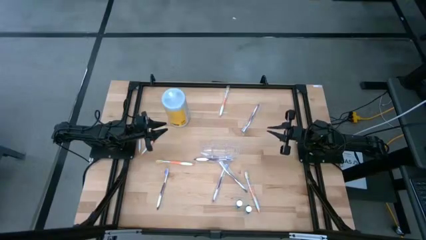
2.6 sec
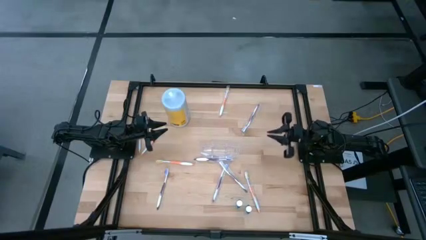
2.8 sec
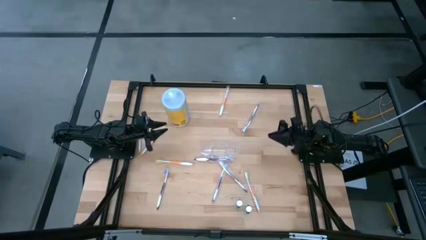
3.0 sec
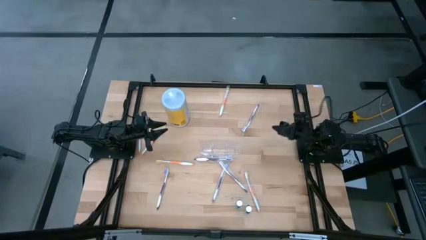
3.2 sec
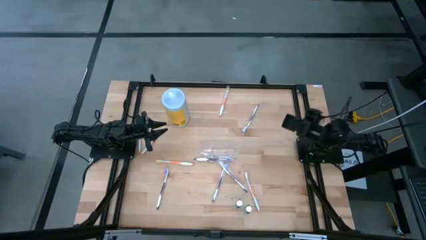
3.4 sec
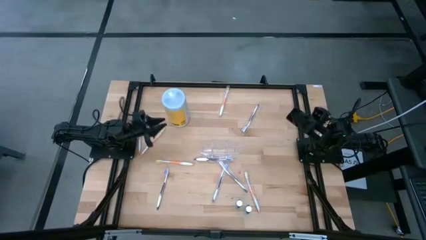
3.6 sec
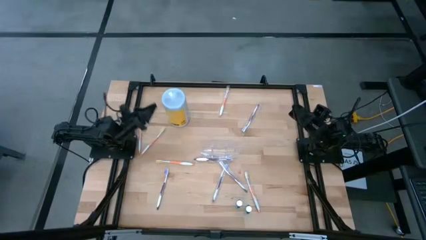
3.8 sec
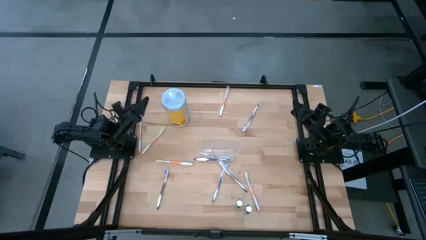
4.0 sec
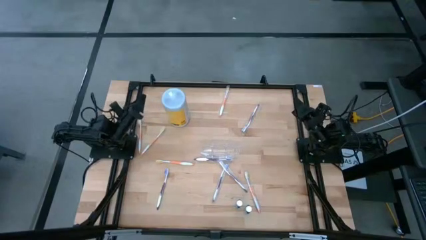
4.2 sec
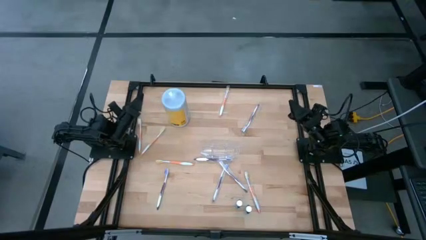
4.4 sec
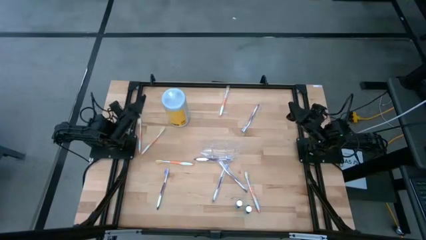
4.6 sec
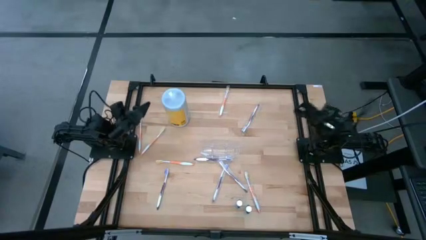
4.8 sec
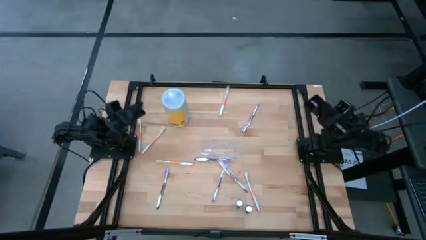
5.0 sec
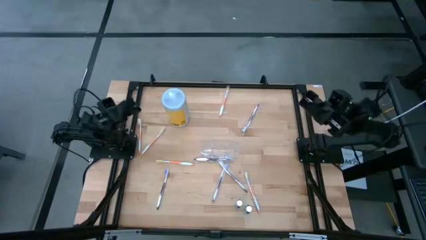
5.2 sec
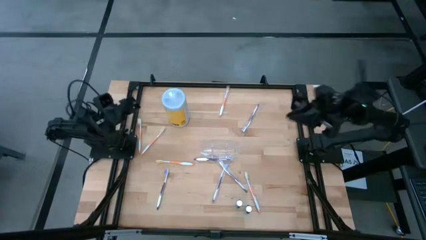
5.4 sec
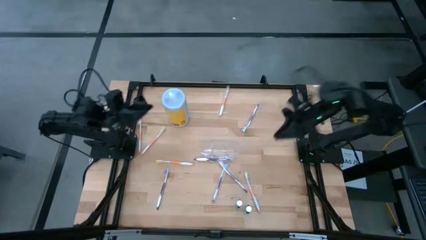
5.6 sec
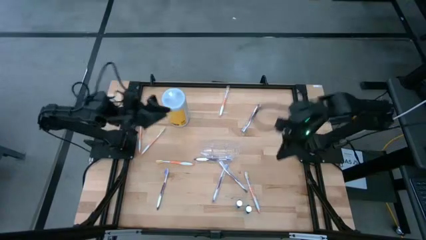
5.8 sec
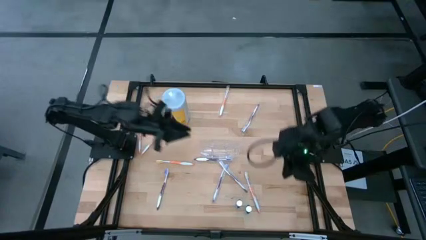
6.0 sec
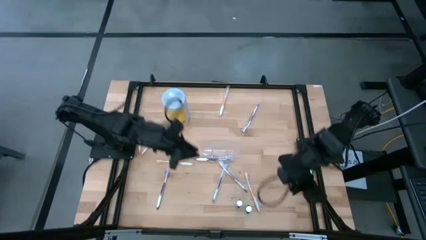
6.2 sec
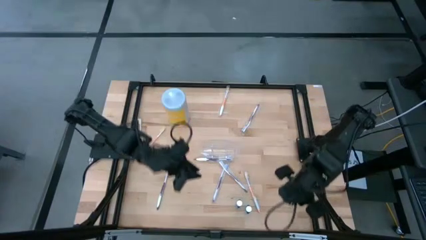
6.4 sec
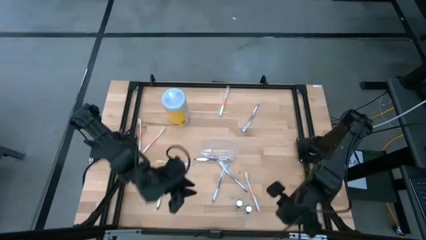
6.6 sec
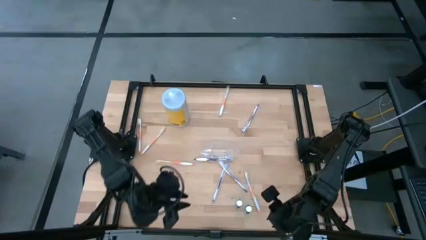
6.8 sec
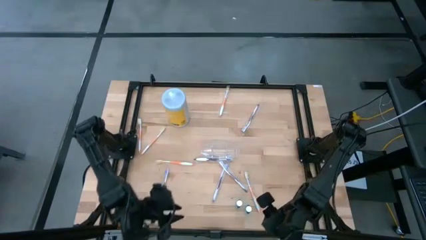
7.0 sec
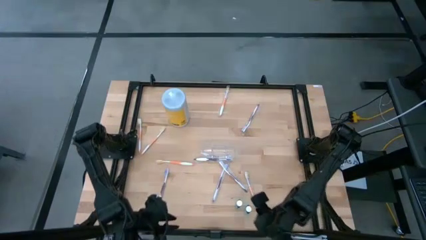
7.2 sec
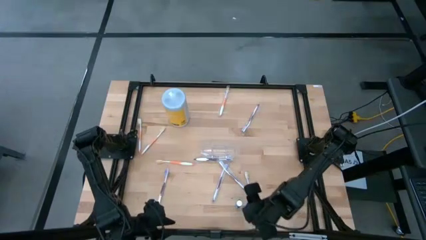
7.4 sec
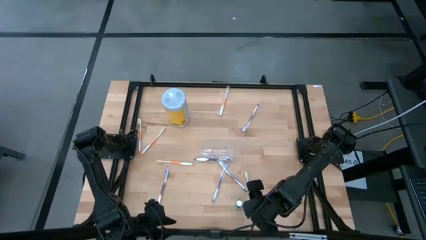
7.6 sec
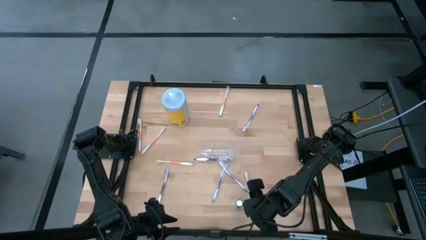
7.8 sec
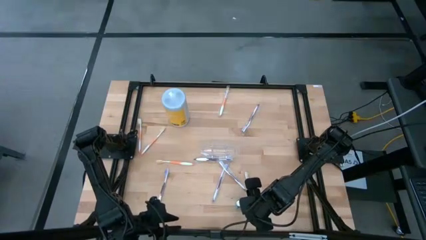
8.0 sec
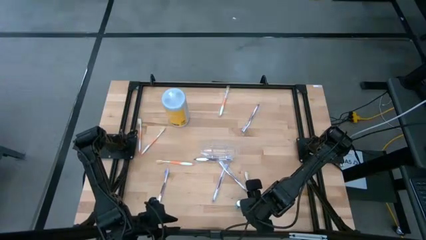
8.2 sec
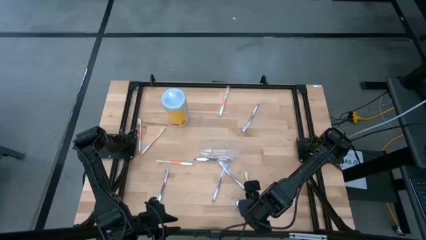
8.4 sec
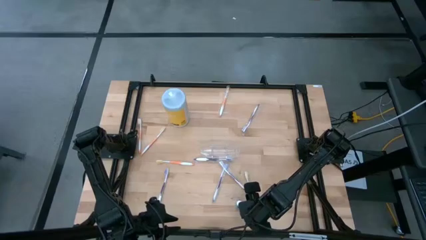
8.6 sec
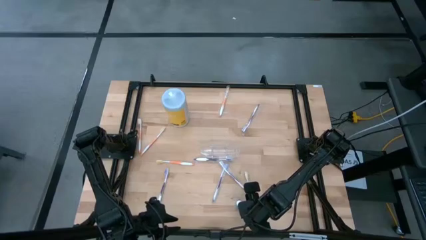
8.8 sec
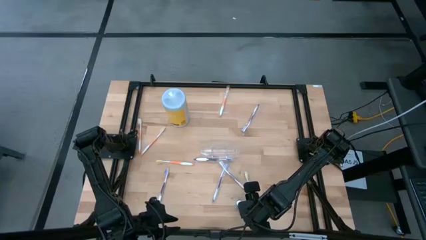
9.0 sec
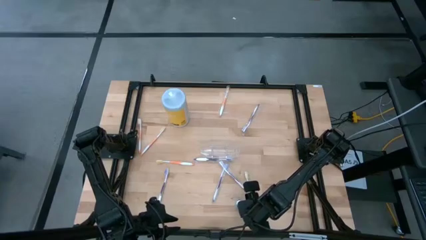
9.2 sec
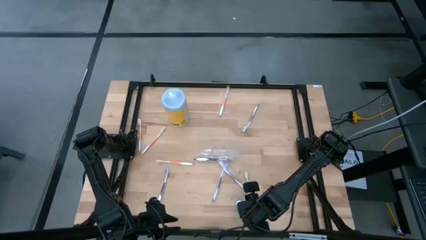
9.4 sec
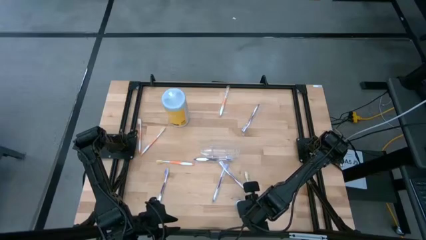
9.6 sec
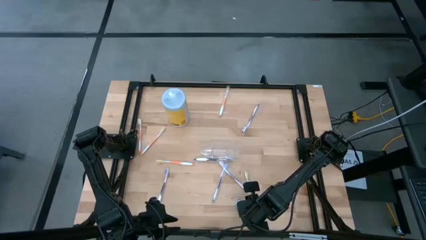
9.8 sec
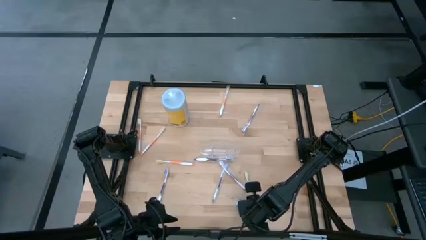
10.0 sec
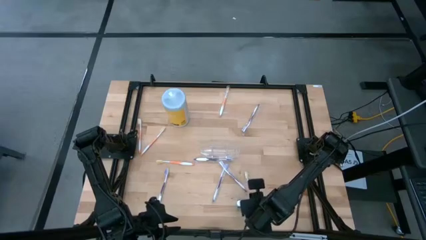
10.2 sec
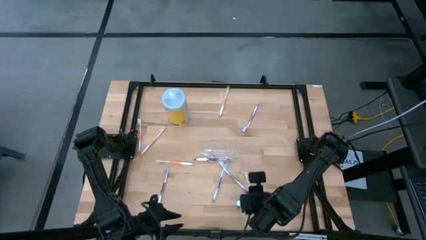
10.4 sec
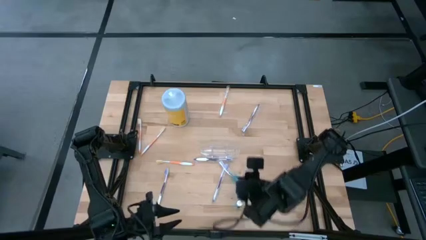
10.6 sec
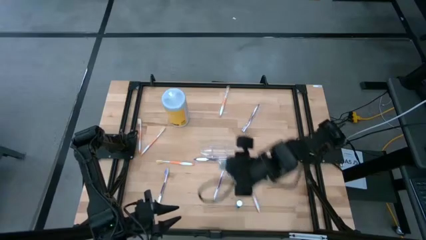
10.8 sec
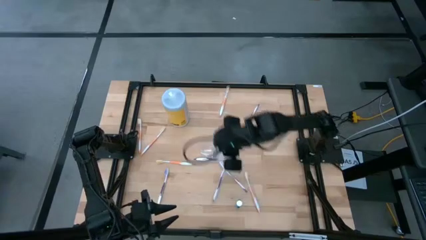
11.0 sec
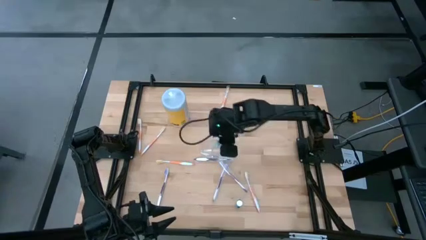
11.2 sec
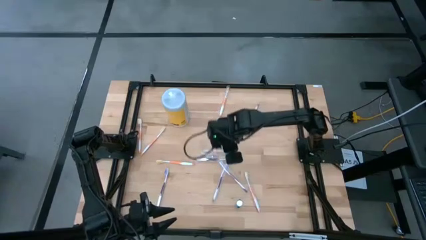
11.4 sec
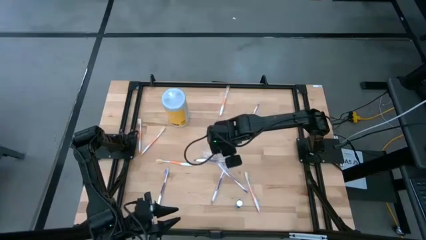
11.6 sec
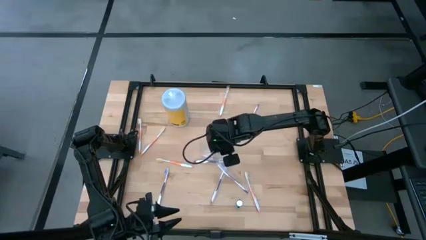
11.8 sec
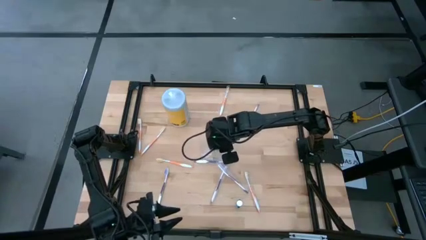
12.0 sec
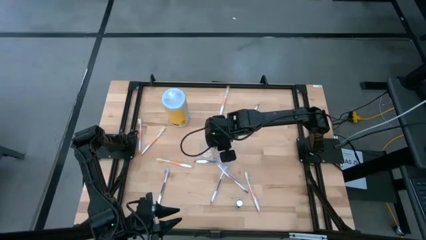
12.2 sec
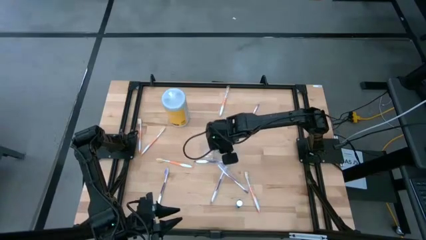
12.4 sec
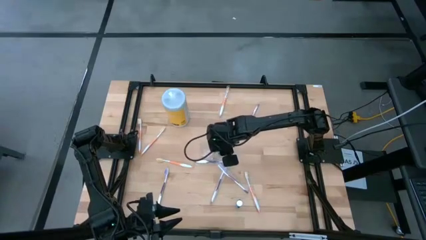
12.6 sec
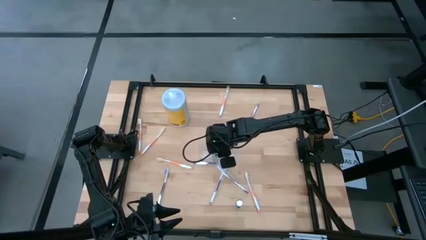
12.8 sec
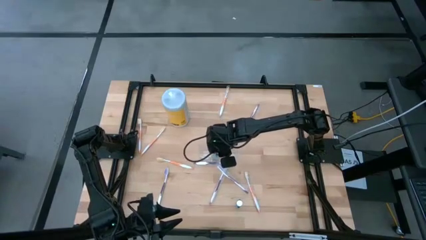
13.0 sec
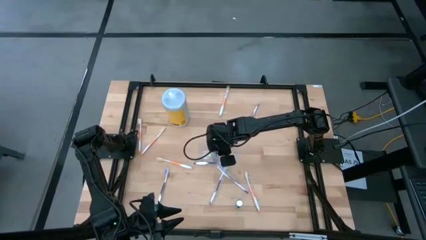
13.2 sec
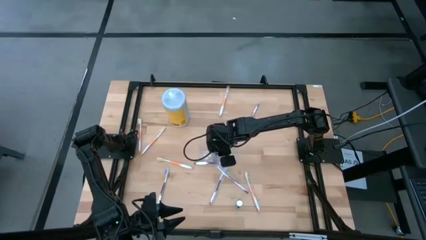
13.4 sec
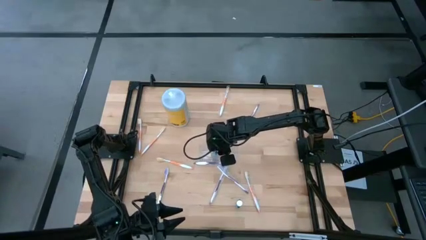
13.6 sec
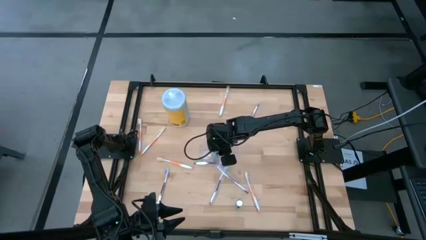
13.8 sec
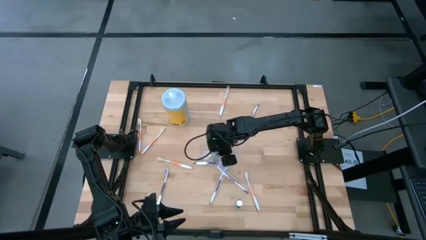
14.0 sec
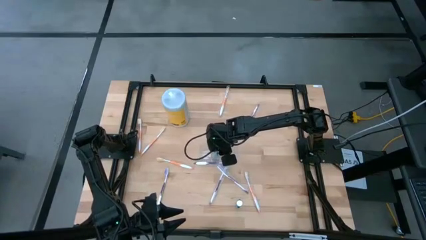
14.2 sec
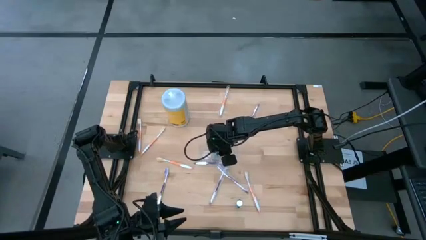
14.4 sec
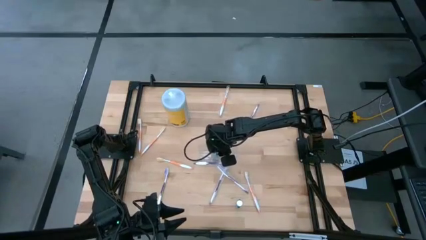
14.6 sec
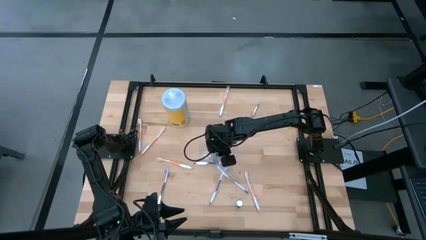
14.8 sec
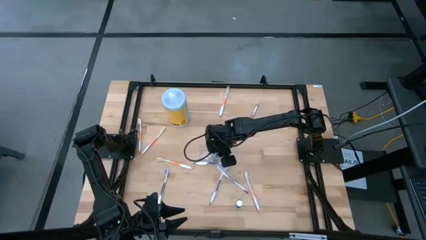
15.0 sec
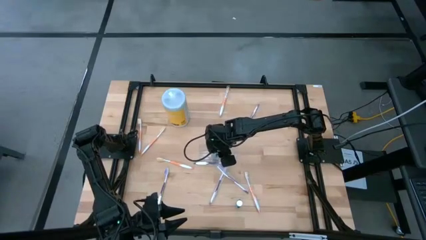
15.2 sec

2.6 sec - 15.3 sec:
Task: Pick & Place toothbrushing station
Put the blue mouthwash into the middle compartment of the transparent organizer

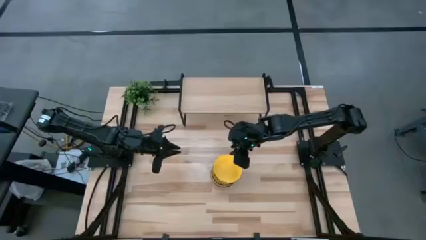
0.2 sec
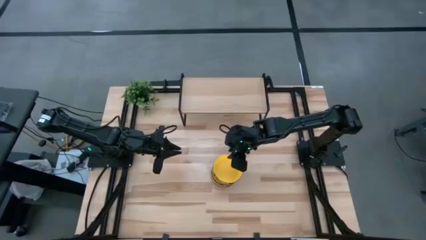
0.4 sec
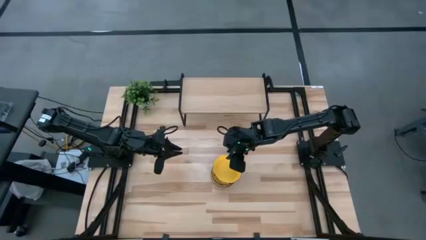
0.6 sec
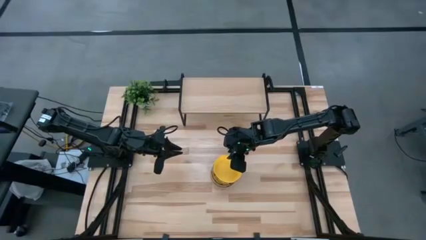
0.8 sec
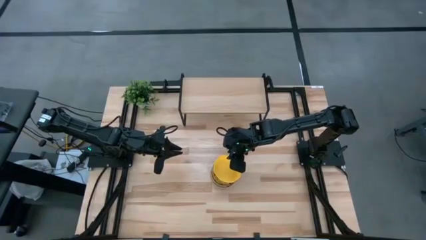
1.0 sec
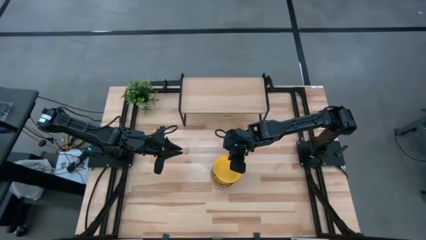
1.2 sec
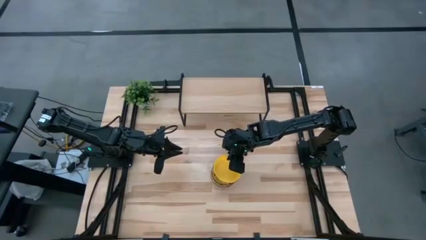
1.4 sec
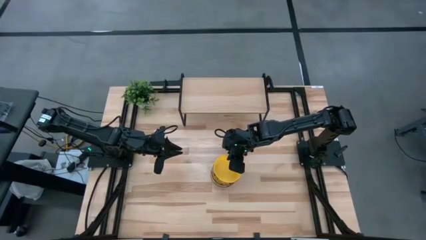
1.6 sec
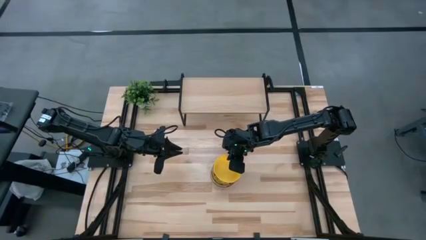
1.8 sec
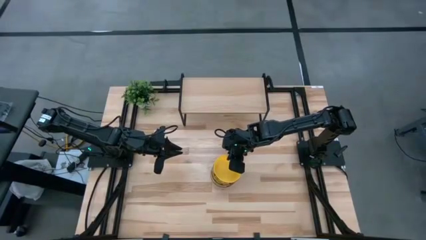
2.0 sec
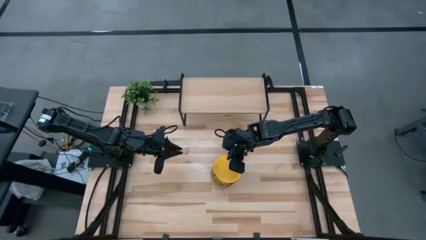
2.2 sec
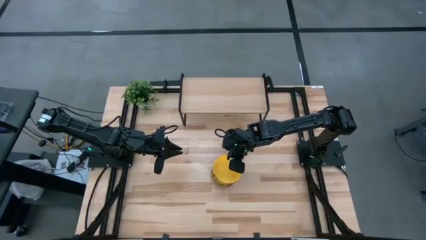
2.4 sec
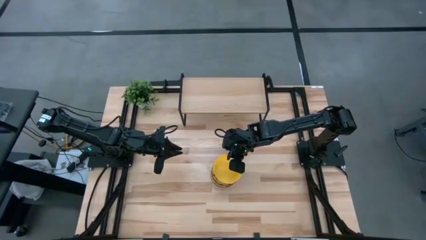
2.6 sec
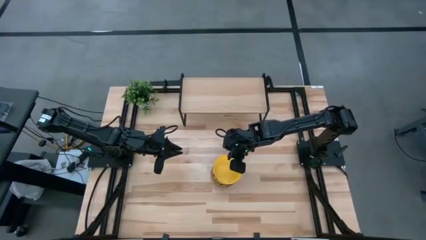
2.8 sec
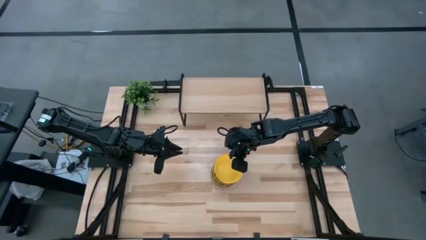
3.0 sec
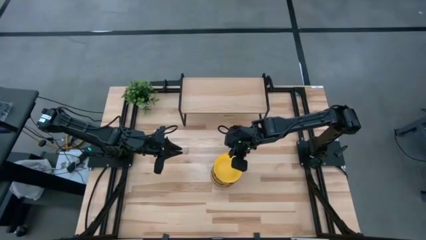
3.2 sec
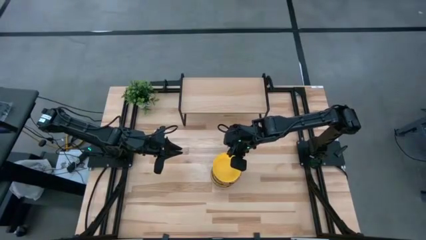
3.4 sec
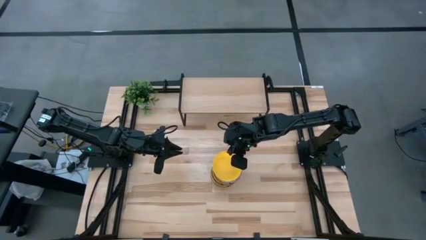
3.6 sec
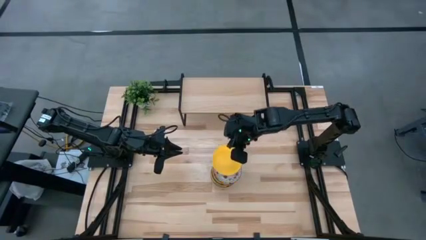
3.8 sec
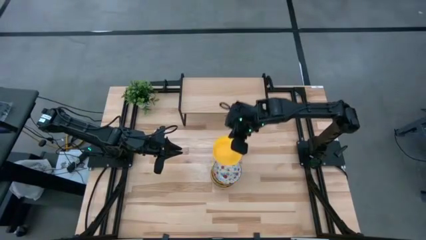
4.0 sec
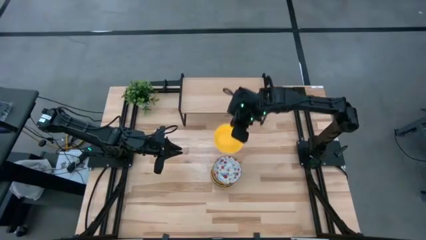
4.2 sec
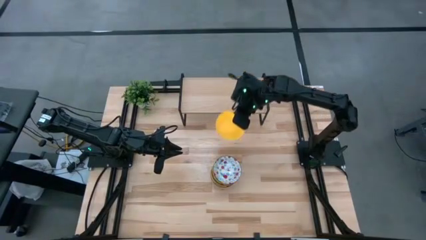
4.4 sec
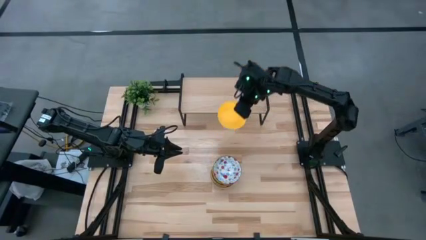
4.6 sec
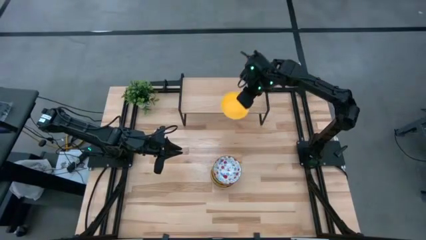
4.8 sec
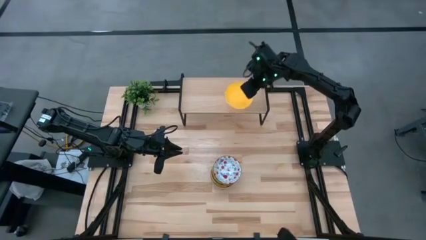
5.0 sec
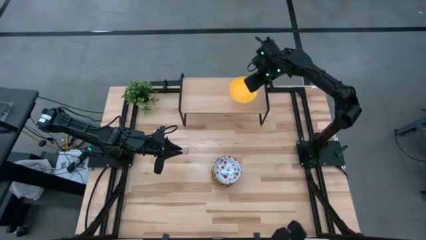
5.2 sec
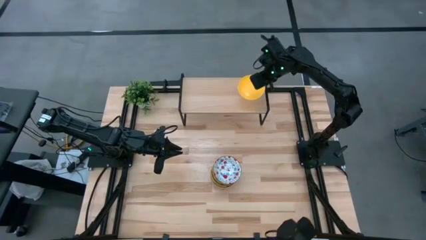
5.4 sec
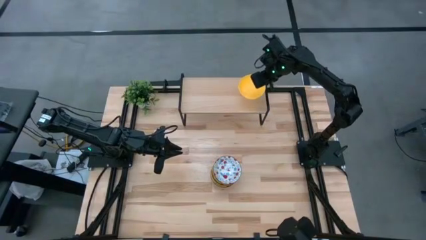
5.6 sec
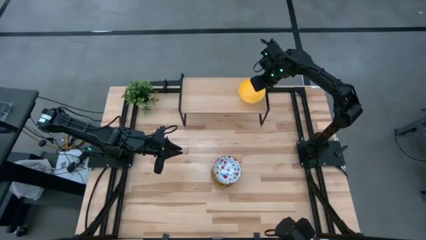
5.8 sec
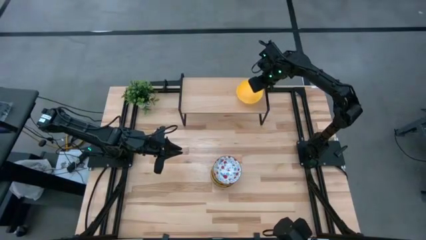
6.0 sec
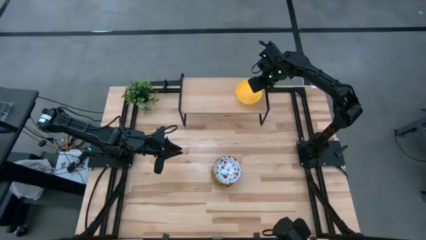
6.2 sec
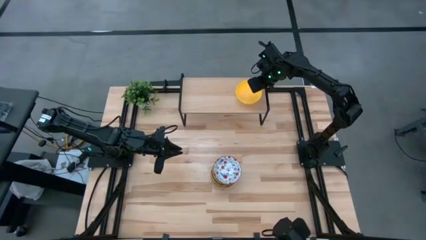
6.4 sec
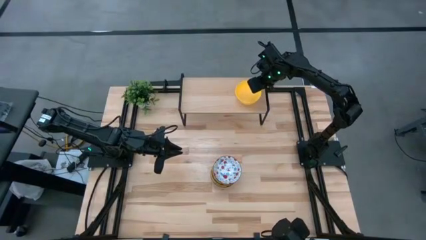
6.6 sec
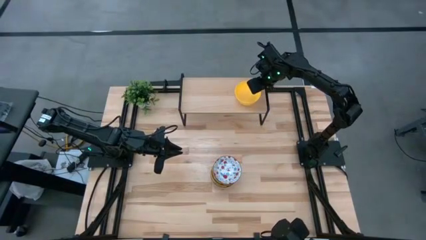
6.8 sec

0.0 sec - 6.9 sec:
Task: Pick & Place Mini bowls
Put the yellow bowl on the shelf
